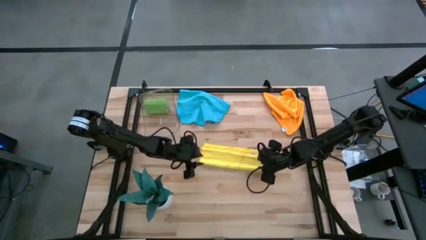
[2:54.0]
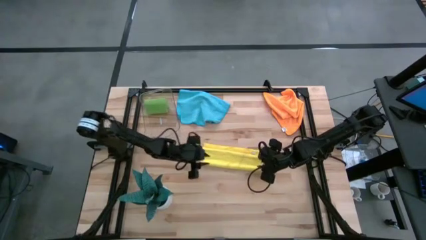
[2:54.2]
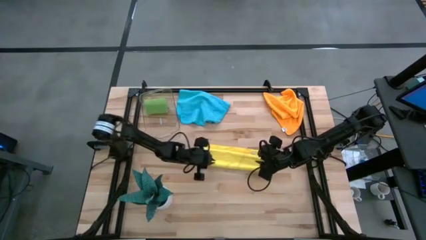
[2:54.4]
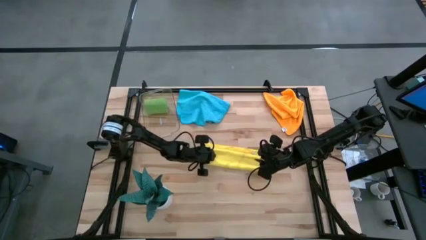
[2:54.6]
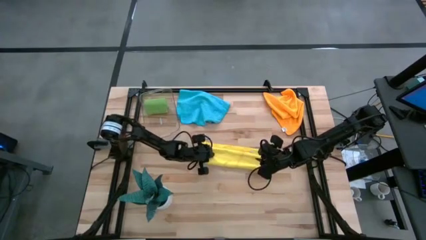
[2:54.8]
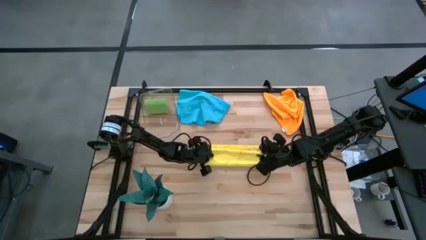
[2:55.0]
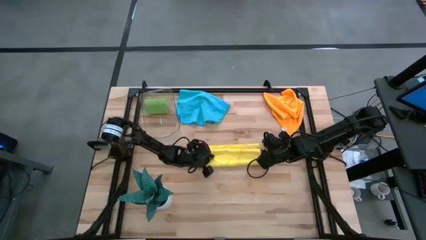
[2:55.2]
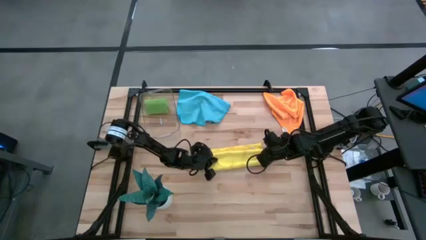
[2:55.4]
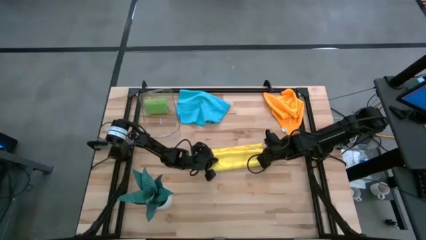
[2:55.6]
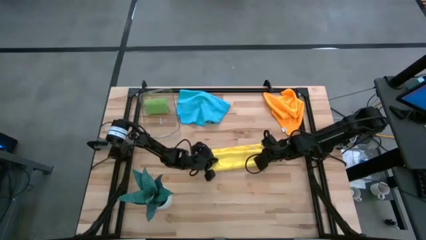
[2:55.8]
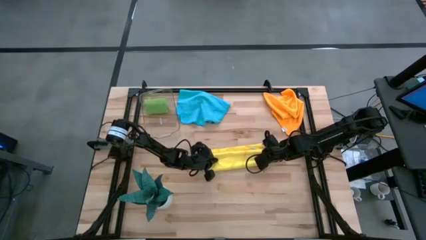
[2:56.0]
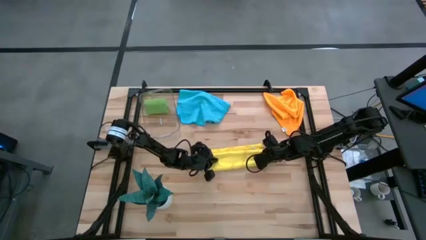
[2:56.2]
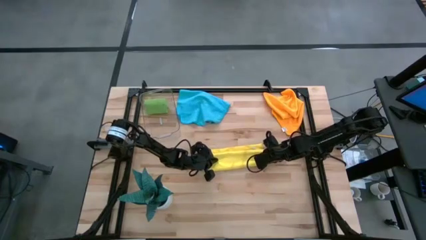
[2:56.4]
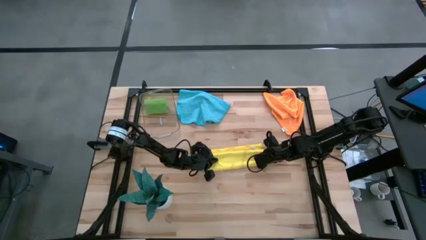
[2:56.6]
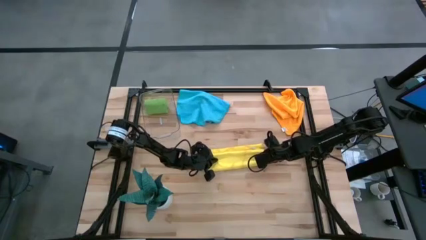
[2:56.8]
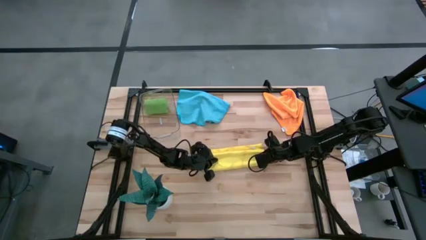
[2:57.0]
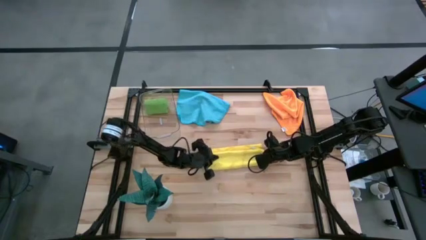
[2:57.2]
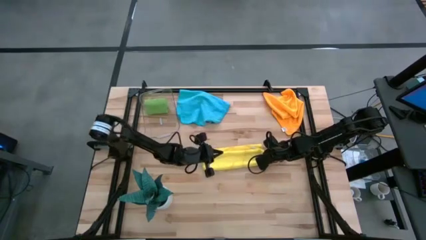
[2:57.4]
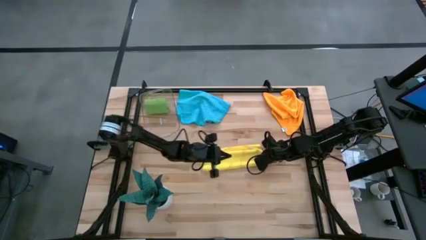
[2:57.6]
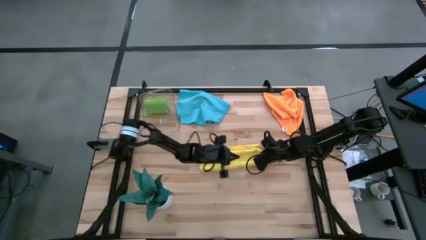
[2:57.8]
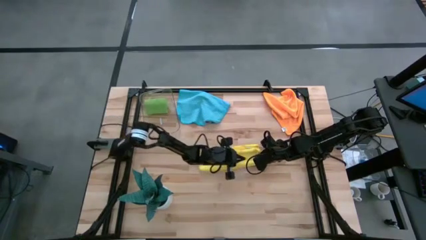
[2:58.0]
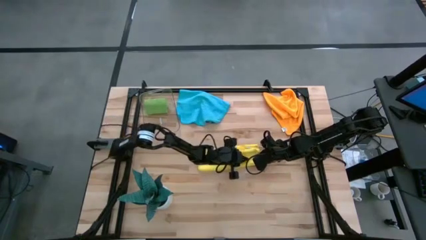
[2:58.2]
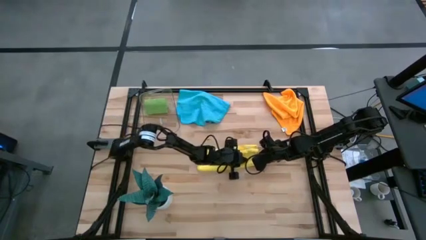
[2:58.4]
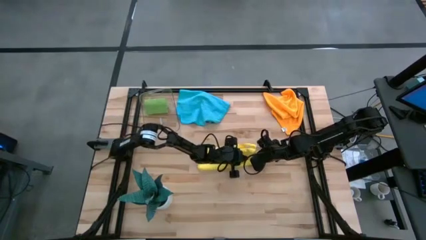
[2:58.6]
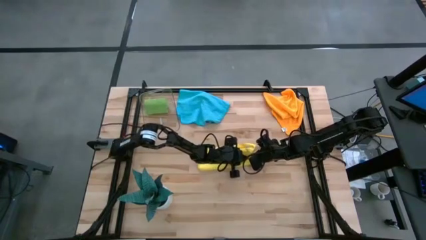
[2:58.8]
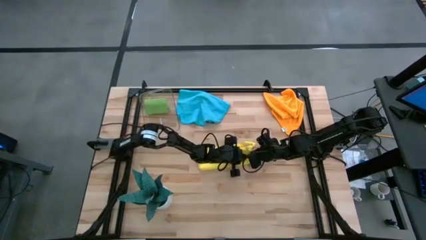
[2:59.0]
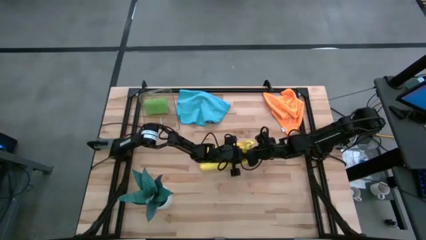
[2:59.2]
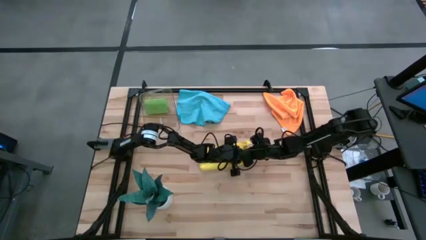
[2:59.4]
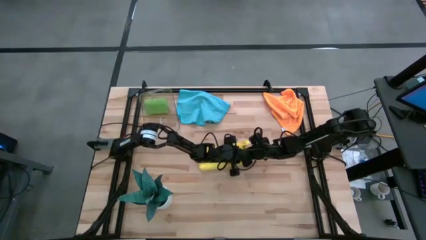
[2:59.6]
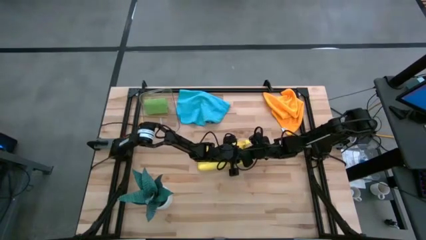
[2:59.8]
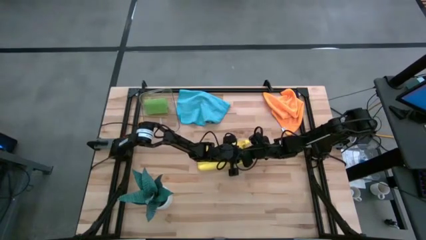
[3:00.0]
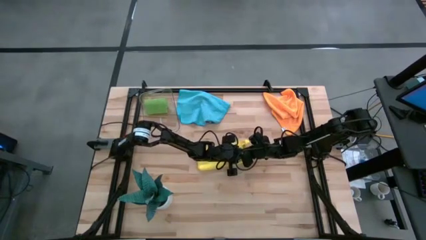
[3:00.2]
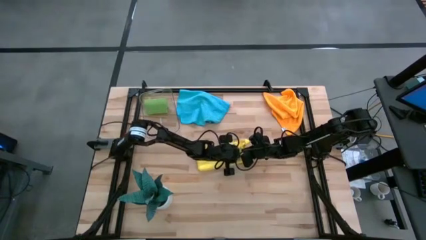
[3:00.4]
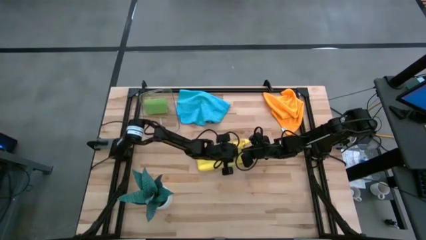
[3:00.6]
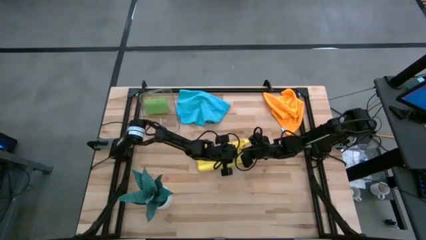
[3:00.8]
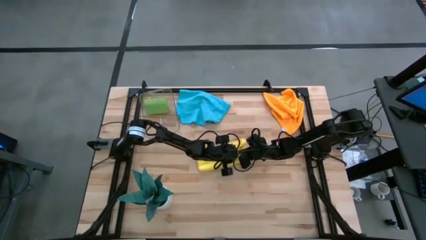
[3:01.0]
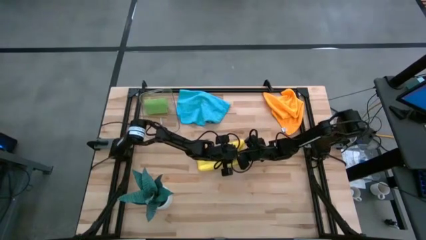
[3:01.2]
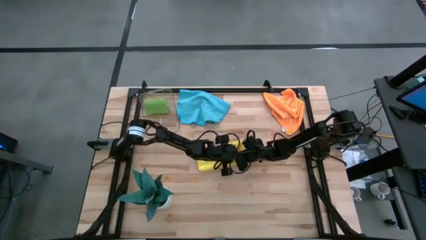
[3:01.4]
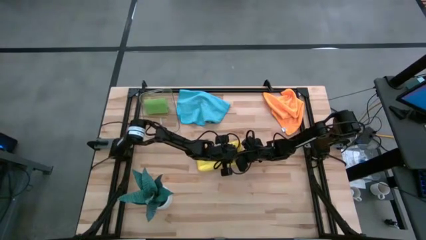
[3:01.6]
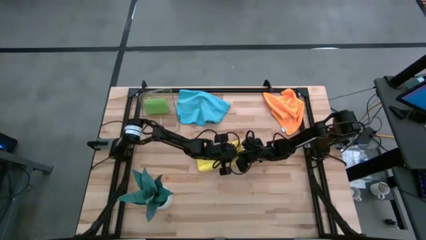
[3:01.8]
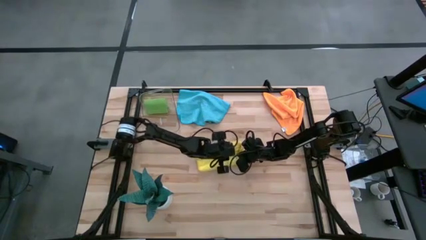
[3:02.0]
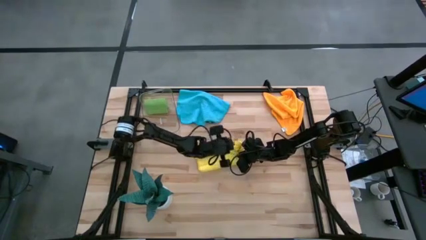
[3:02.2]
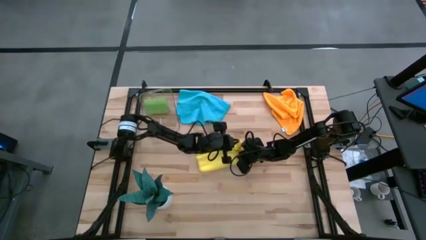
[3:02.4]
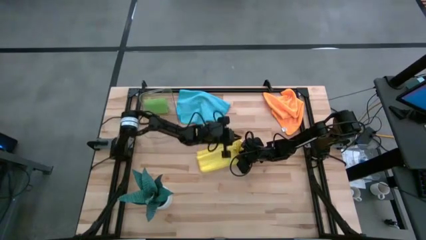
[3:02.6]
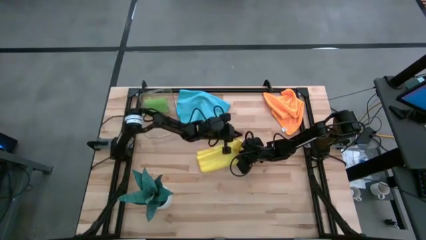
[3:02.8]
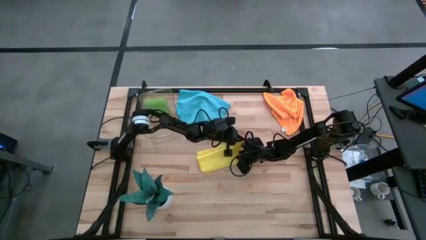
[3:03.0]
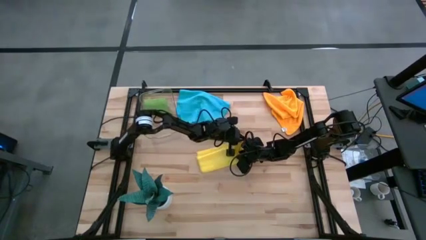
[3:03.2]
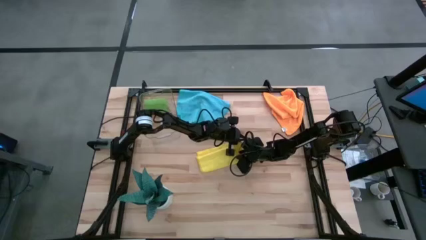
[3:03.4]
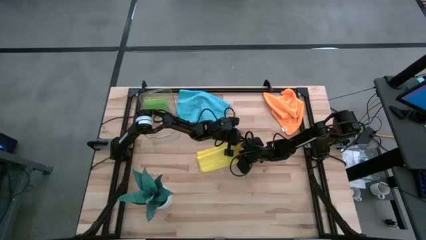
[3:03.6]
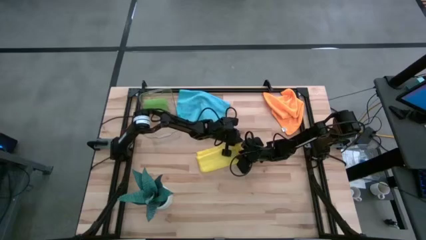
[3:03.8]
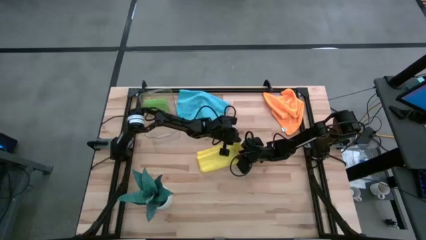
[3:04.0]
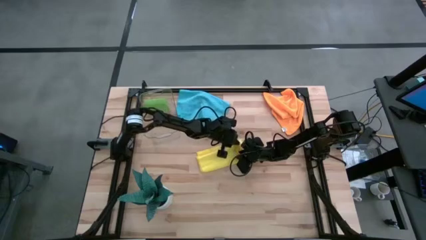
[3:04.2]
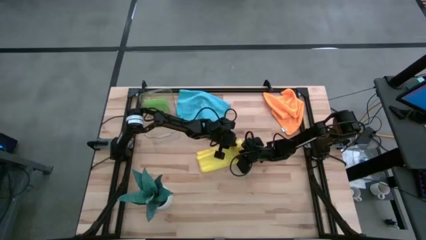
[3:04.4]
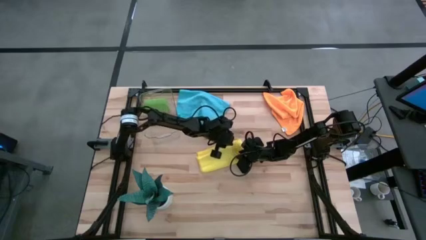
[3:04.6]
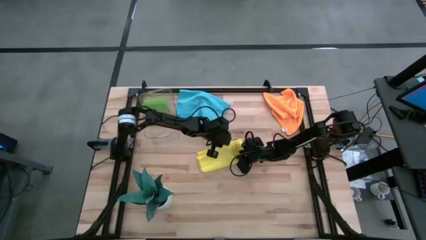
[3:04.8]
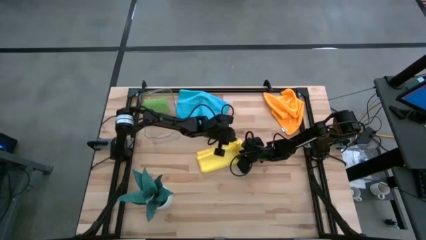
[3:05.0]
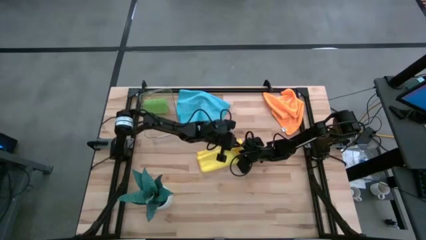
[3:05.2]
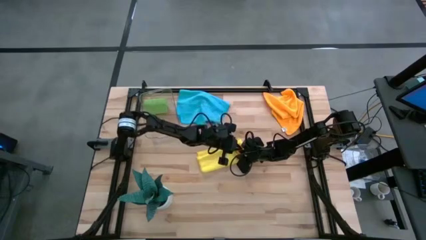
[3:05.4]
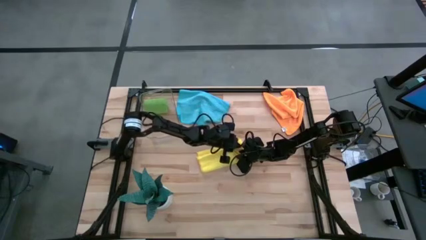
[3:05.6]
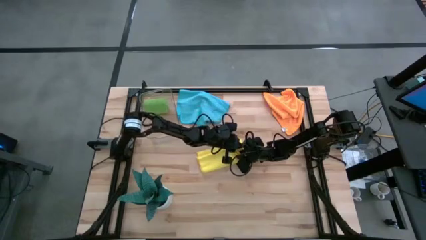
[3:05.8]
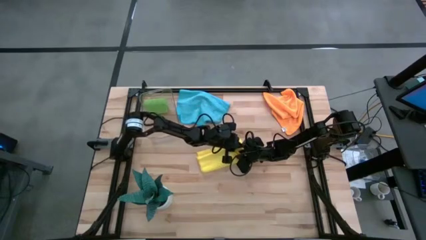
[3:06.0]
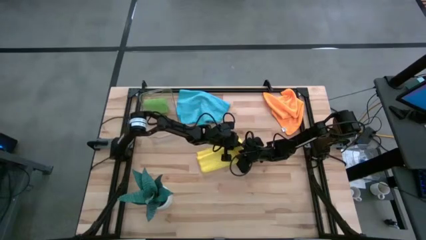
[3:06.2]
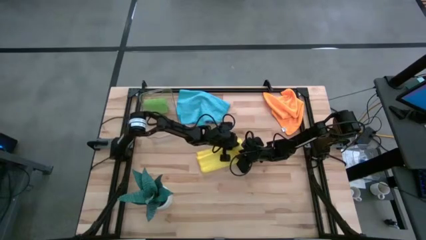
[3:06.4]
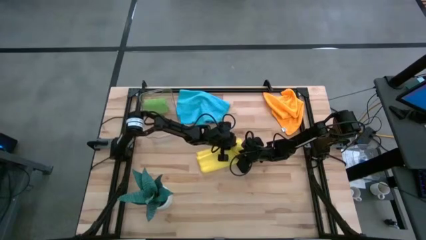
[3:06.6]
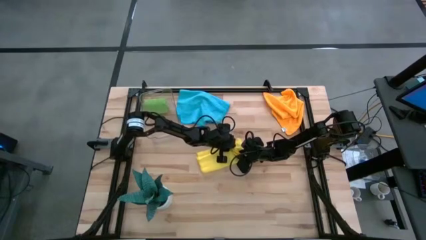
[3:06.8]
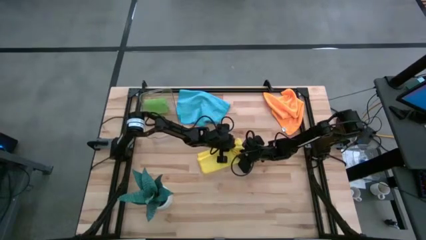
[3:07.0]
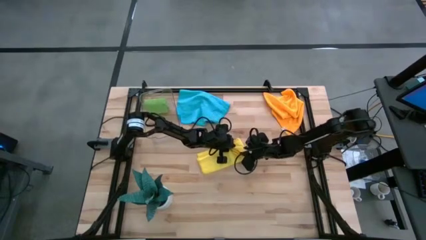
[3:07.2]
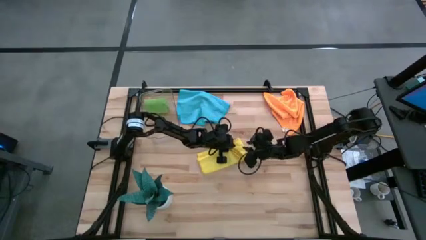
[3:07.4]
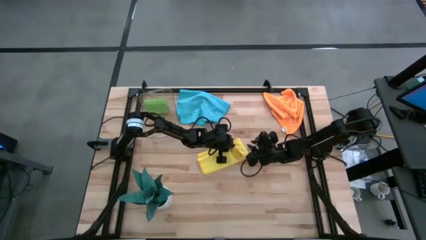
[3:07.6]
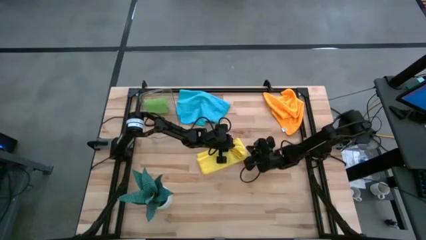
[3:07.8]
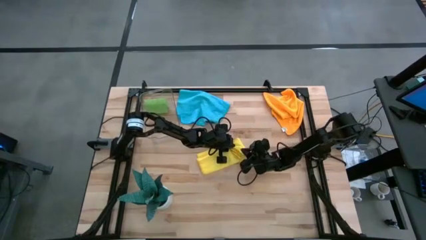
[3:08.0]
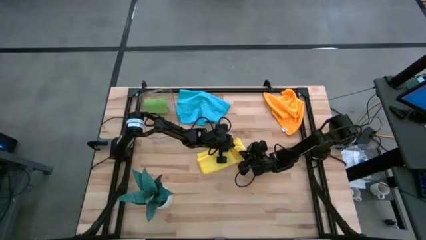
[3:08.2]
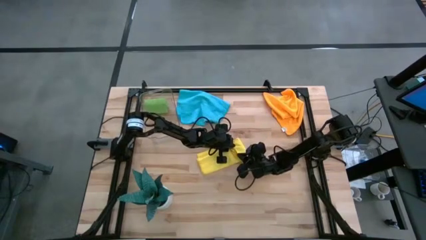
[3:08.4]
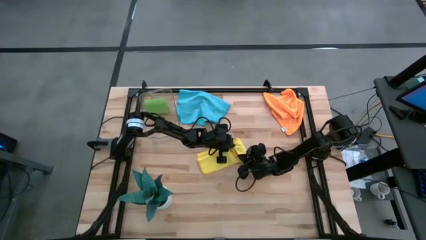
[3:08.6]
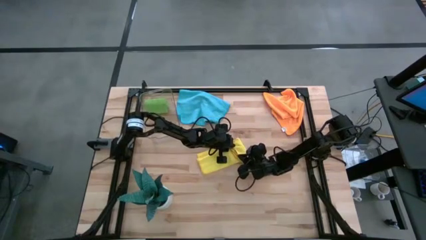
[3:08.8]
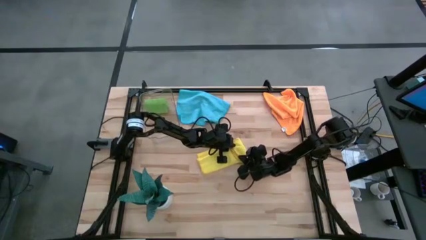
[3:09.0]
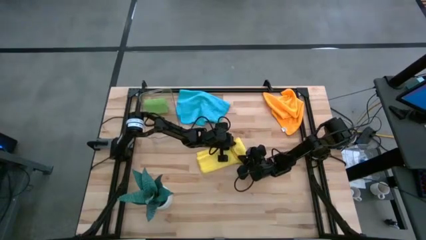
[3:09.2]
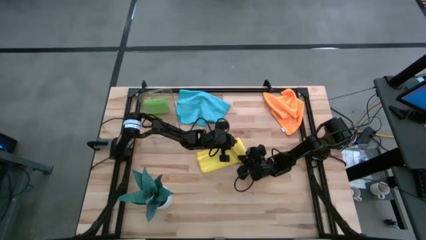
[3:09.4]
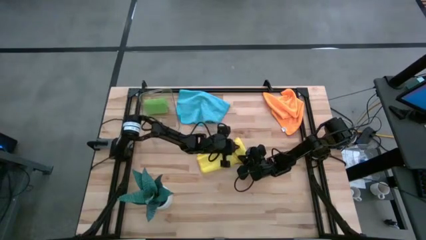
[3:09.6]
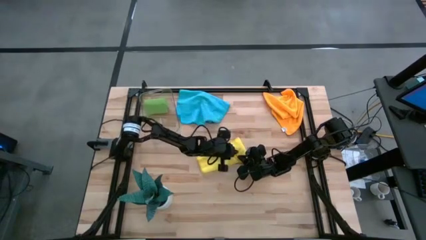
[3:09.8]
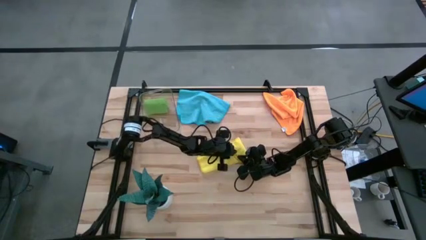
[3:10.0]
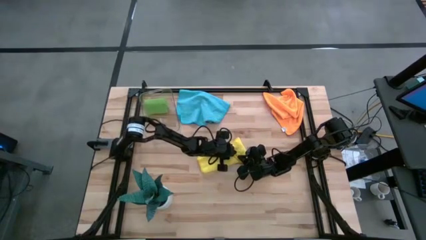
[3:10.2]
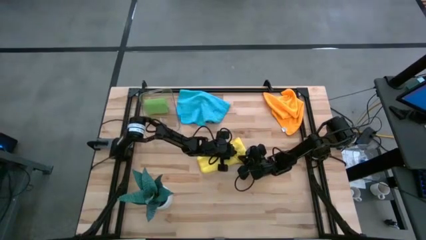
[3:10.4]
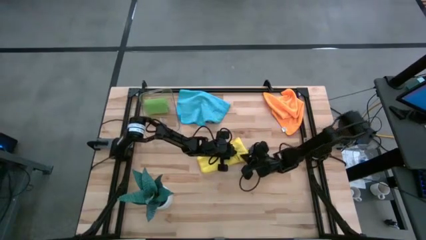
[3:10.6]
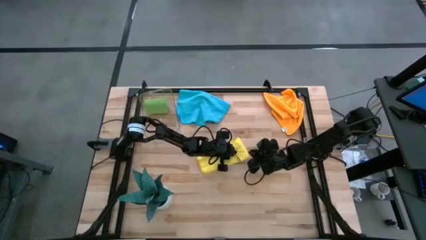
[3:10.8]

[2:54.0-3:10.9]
Task: Roll microfiber towels into tight, uniform cylinder then place into a basket
Roll the yellow microfiber towel

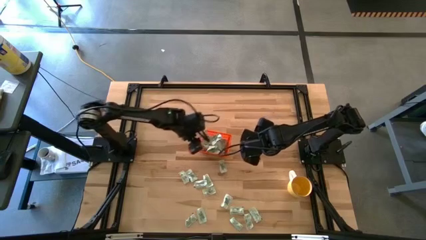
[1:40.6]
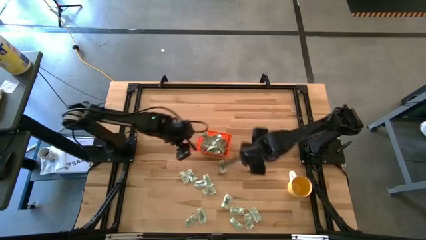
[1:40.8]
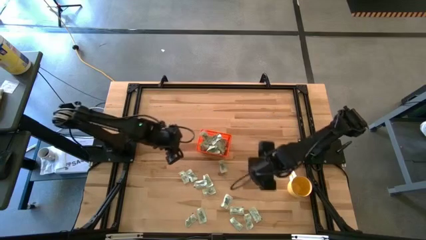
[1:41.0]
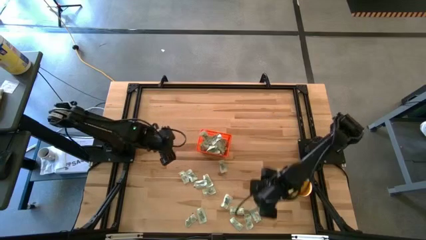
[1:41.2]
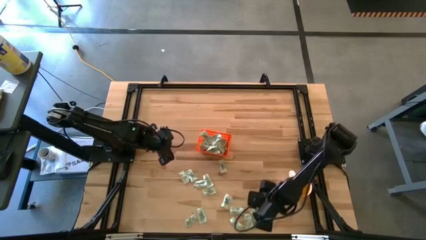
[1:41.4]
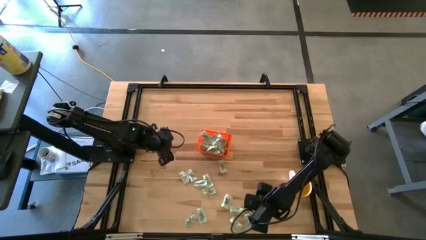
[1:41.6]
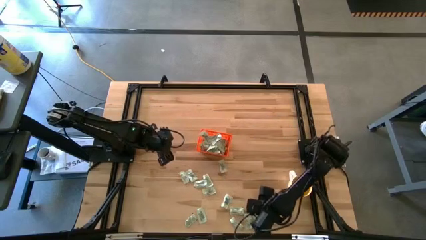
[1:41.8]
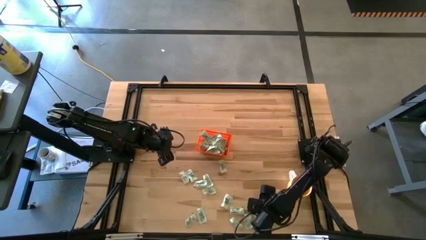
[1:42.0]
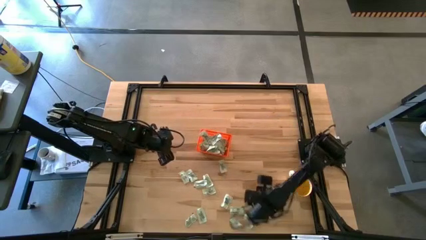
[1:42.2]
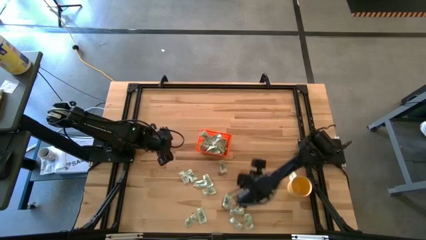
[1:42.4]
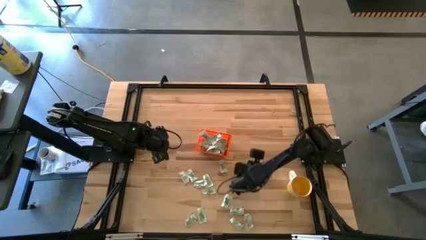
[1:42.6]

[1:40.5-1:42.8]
Task: Pick and place Stevia / Truvia into bins
Put the light green stevia packet into the orange bin
